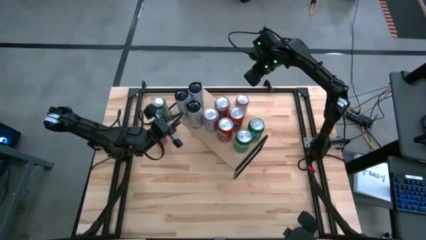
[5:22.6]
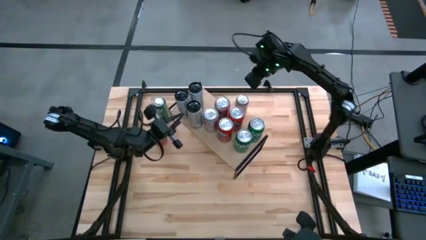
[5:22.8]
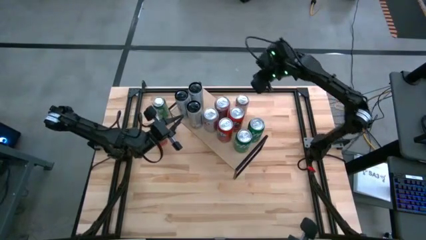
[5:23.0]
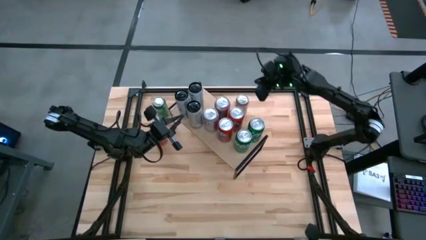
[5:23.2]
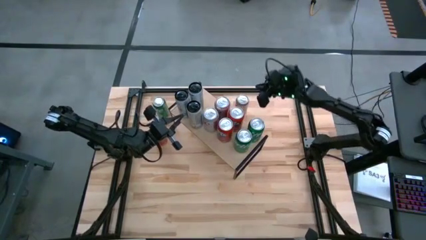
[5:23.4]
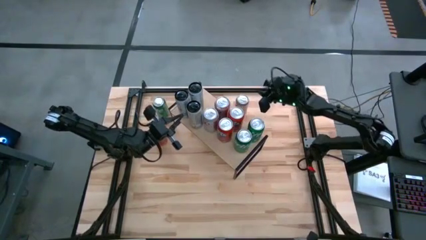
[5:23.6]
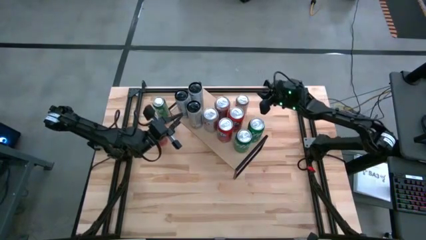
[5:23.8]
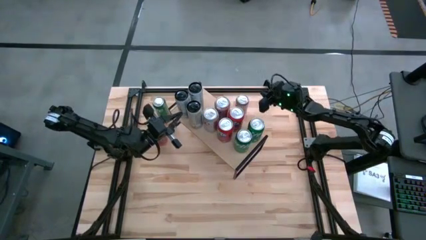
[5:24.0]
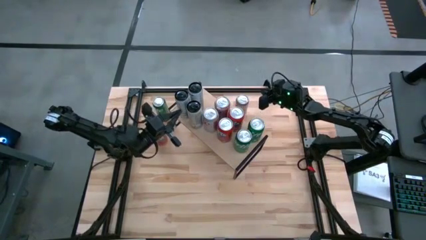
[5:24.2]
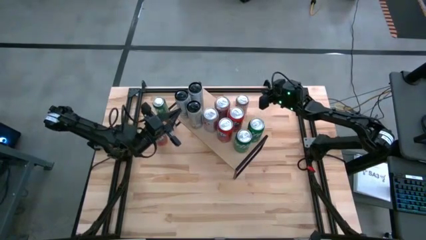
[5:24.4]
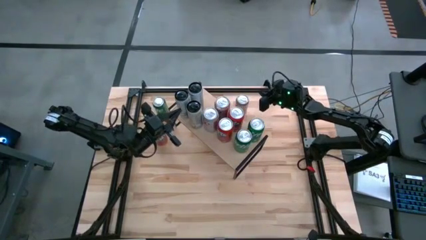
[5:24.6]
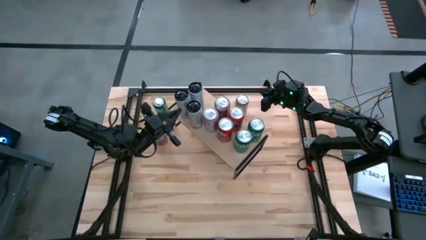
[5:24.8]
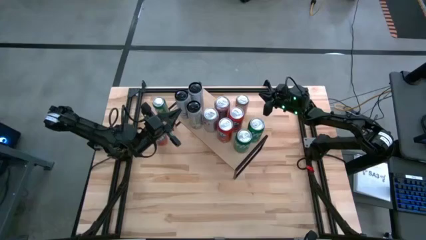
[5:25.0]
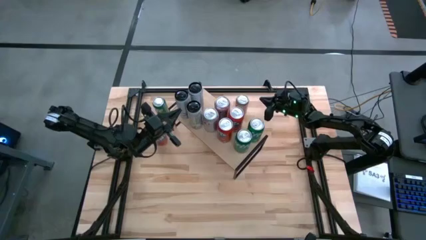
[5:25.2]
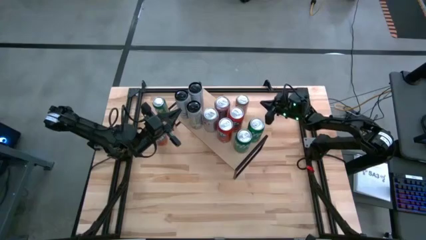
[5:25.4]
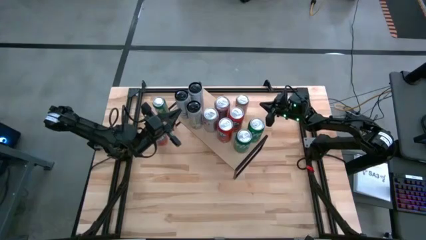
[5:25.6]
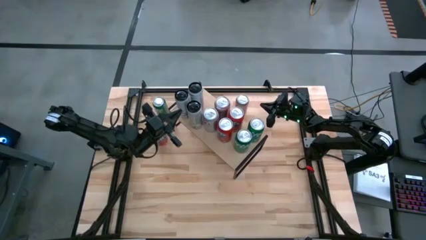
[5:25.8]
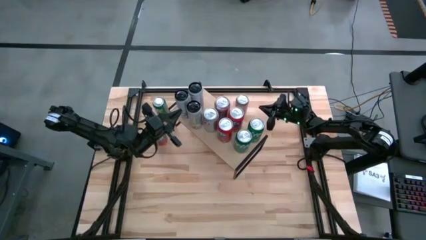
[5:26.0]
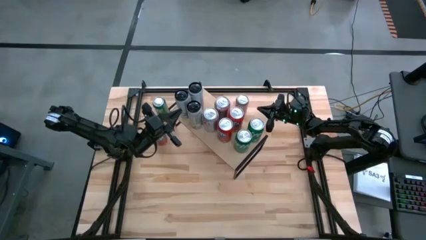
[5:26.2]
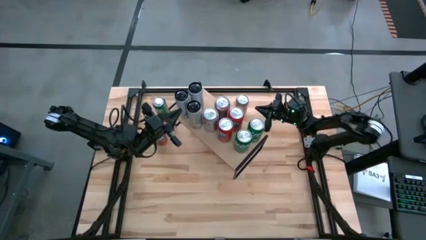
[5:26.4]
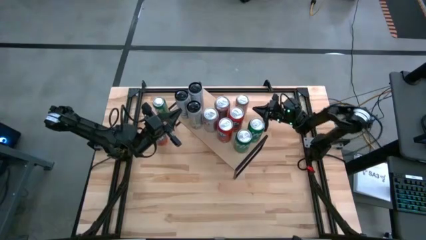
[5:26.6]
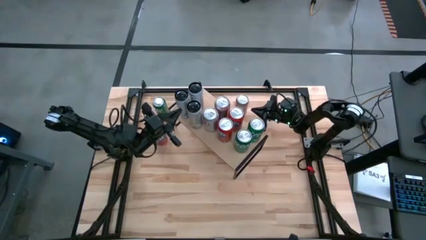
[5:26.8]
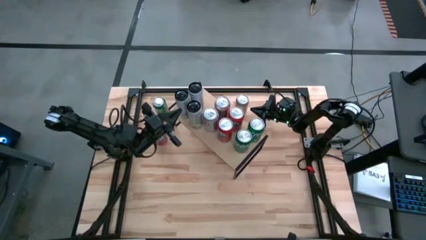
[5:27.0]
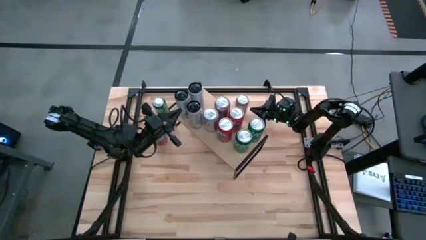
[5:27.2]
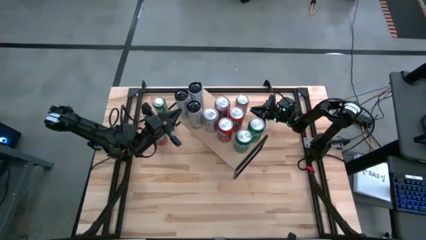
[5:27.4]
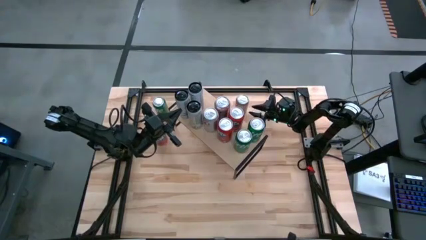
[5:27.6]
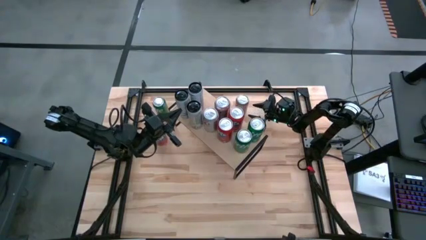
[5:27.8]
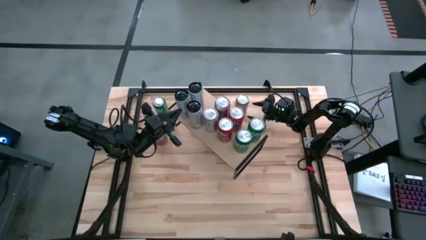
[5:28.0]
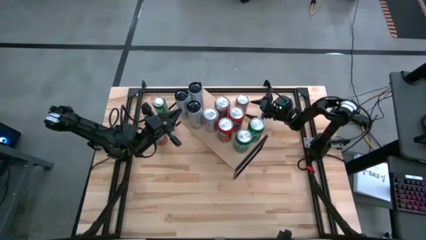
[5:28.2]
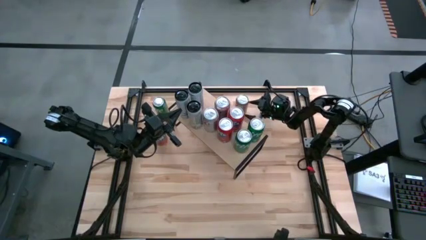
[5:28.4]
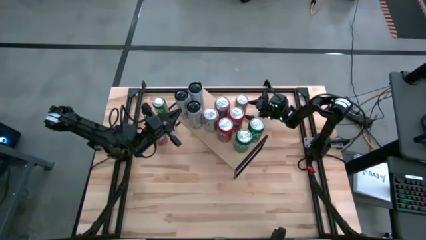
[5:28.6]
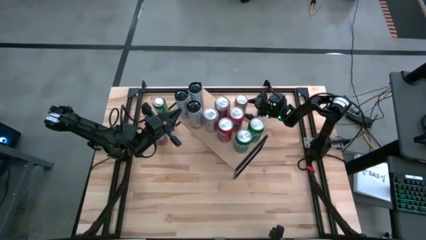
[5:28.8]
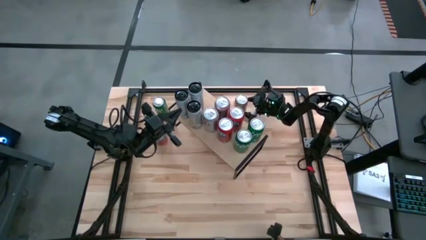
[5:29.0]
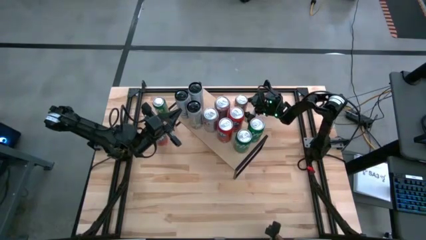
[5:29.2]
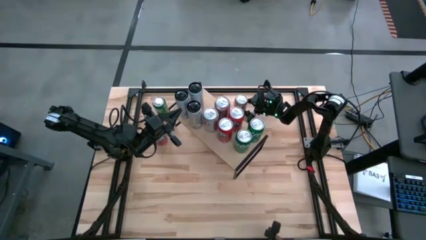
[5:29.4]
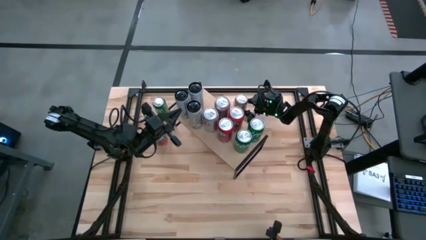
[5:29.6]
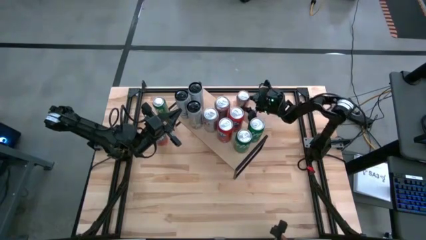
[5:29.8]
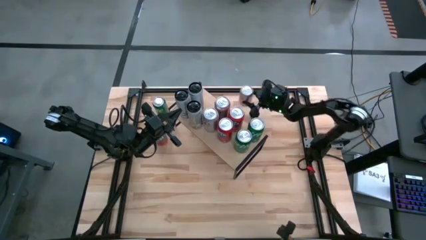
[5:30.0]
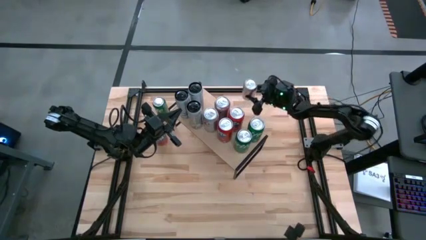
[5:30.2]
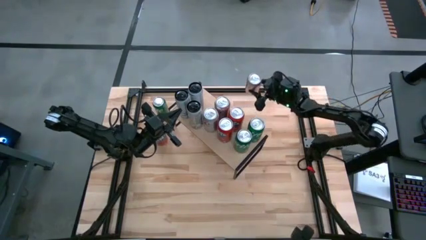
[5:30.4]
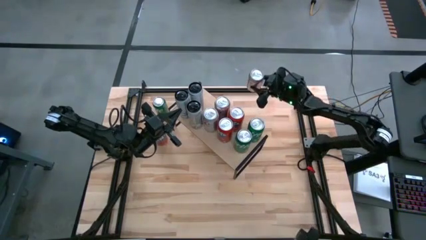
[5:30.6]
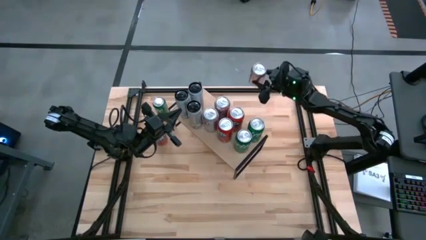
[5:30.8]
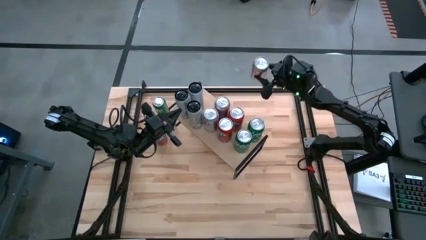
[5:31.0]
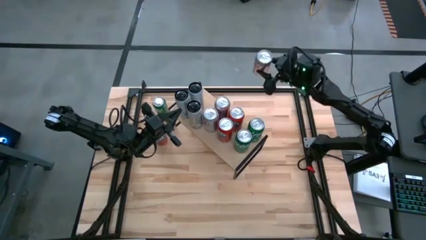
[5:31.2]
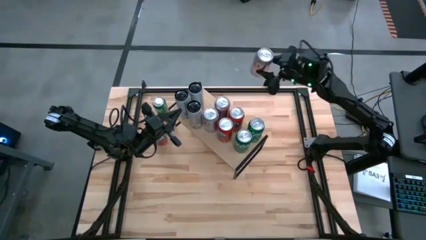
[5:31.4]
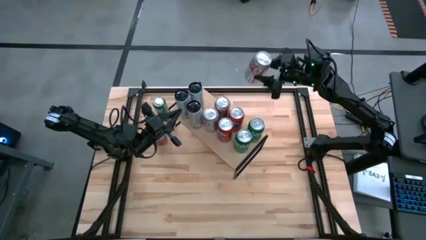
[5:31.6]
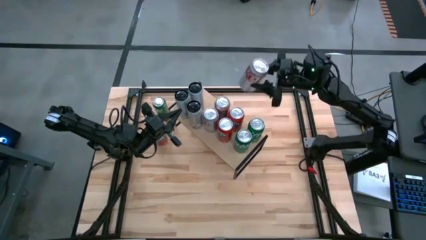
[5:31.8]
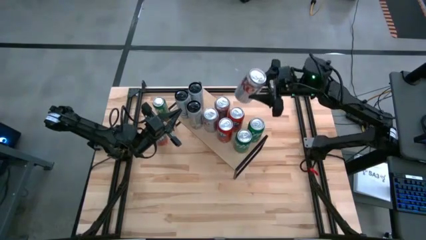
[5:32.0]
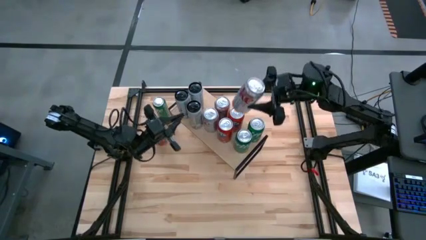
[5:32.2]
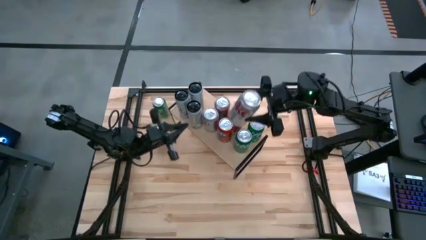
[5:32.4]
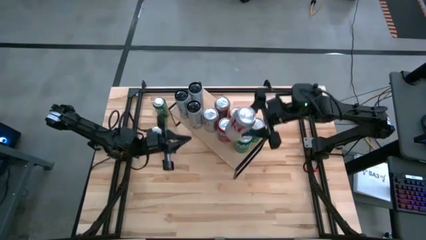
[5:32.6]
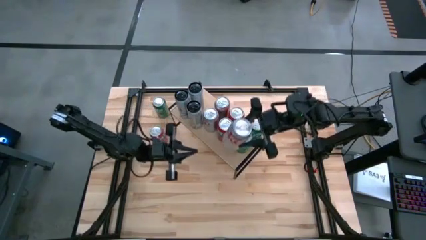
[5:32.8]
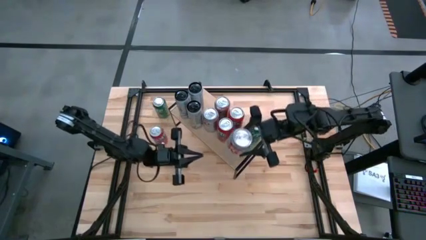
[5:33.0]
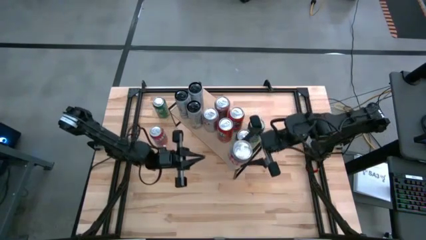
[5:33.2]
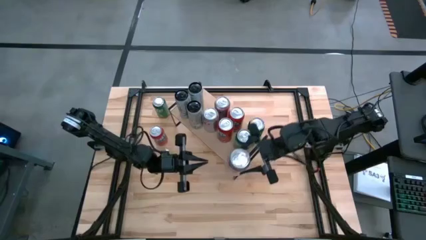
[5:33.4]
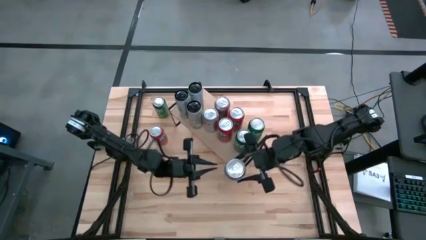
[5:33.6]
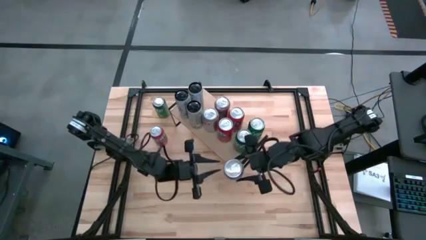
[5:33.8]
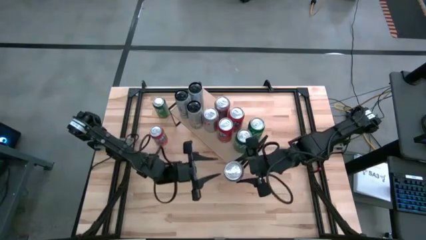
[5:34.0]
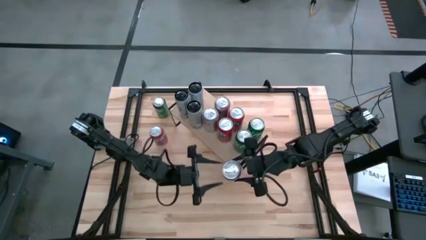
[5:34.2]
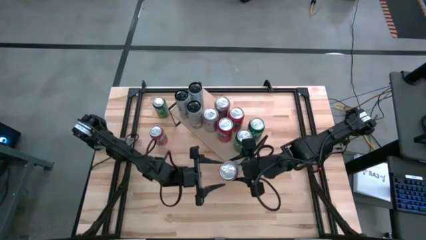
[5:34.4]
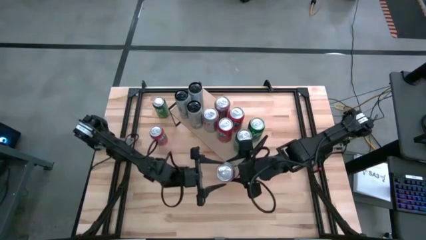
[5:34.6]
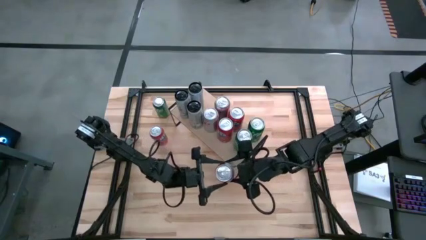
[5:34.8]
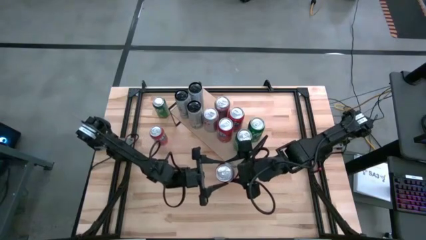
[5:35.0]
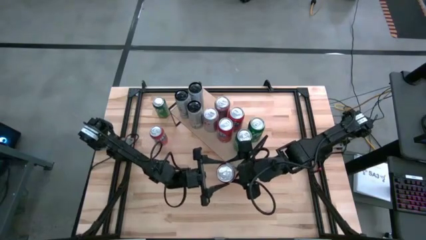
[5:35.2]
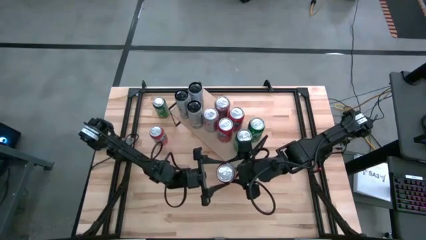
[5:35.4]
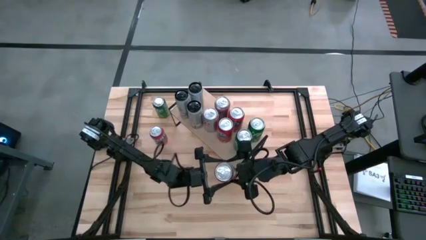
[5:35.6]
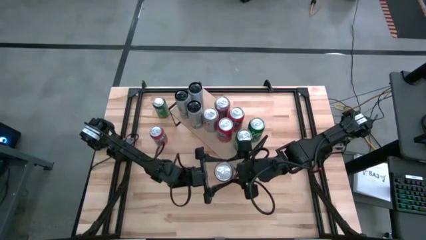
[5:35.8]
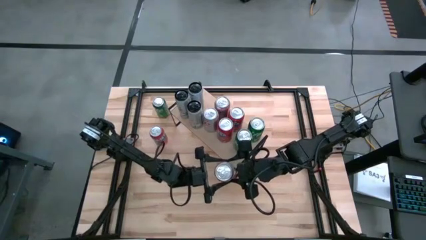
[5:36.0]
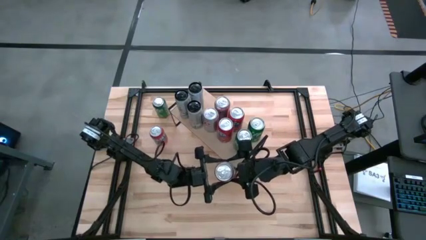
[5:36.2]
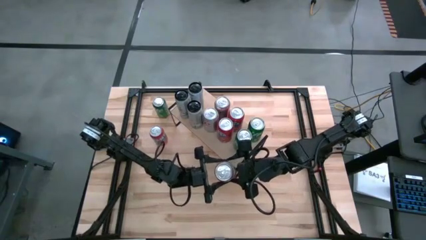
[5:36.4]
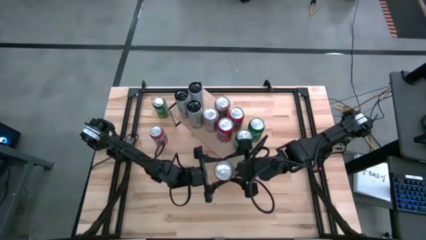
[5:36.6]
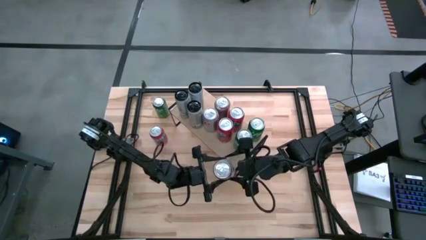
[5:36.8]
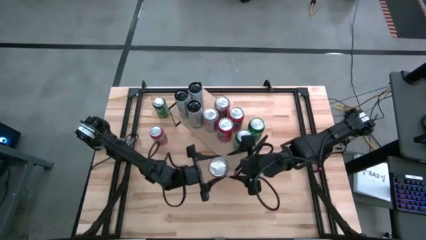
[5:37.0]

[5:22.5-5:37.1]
Task: Place canned beverage on shelf
Put the silver soda can on the shelf aligned with the other silver soda can

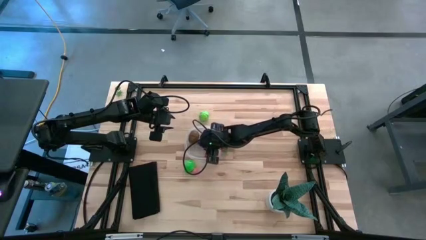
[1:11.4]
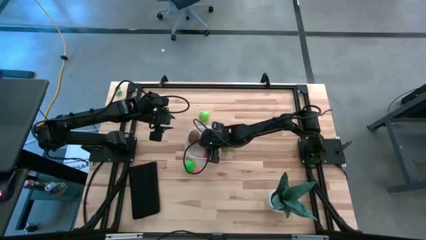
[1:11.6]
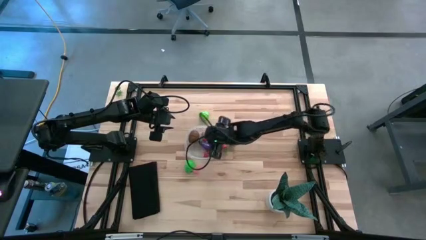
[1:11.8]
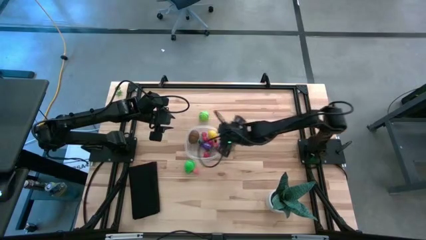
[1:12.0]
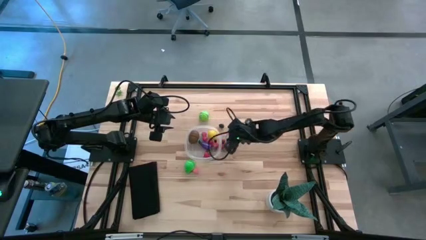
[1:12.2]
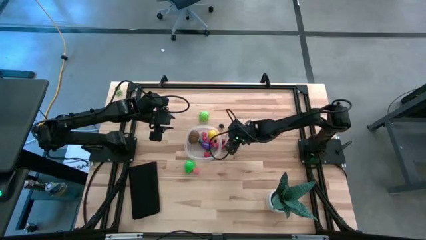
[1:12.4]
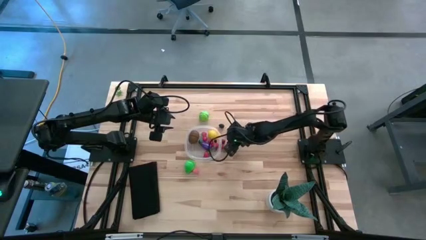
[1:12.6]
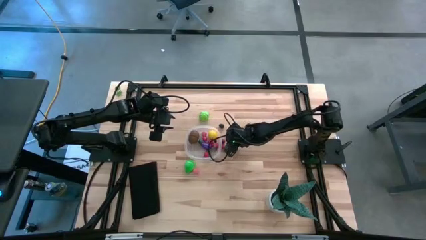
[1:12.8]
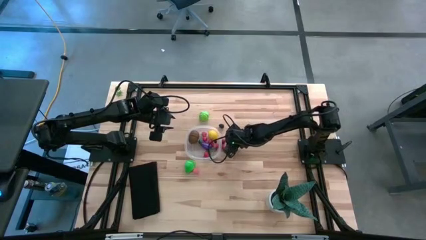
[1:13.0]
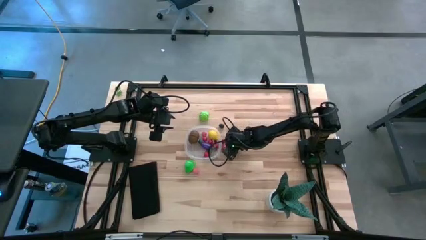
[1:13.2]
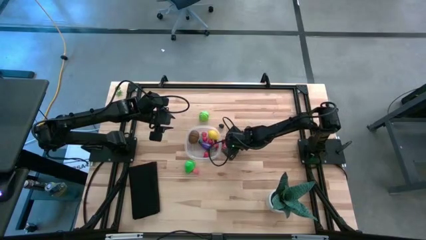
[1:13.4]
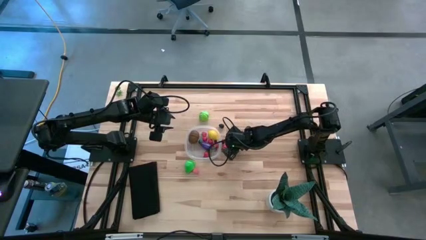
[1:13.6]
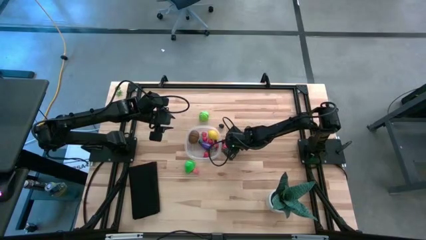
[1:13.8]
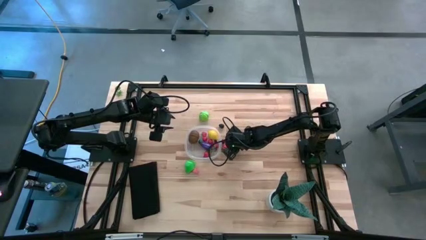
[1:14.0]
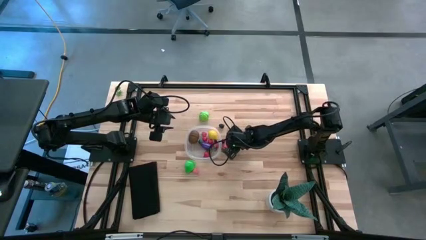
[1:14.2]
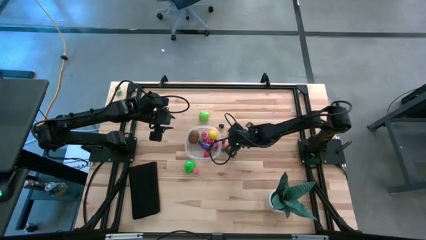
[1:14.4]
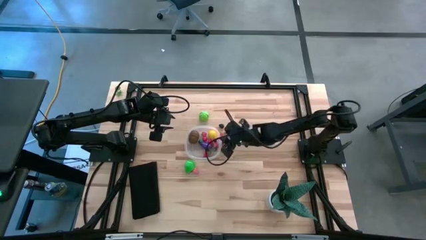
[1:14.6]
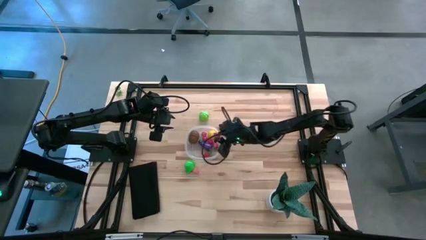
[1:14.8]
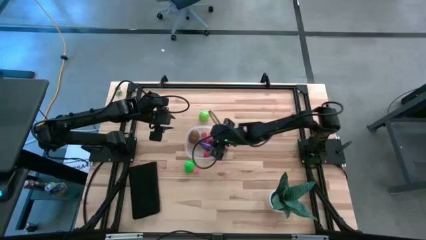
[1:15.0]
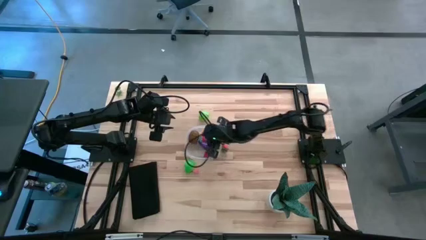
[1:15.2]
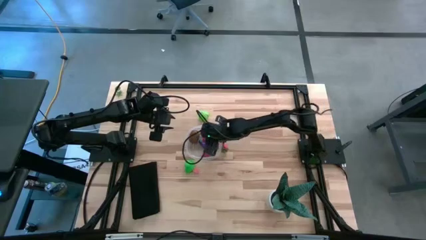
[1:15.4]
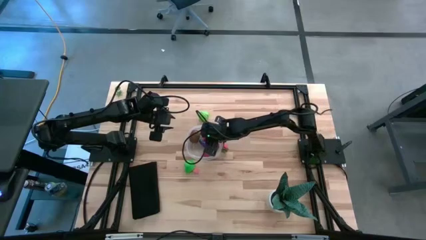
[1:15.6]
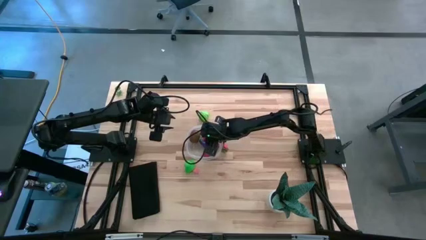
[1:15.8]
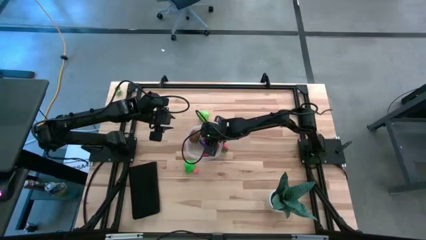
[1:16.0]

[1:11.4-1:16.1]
Task: Pick and placing Produce into tupperware
Put the right strawberry into the transparent bin
